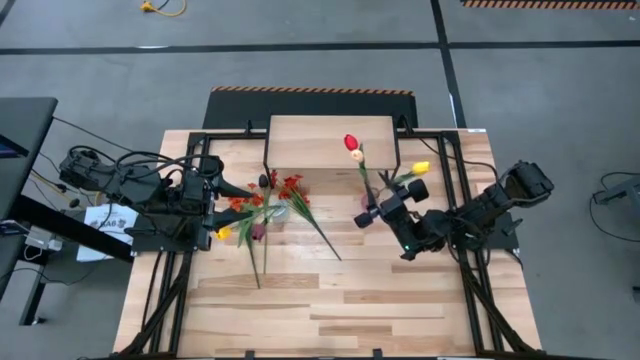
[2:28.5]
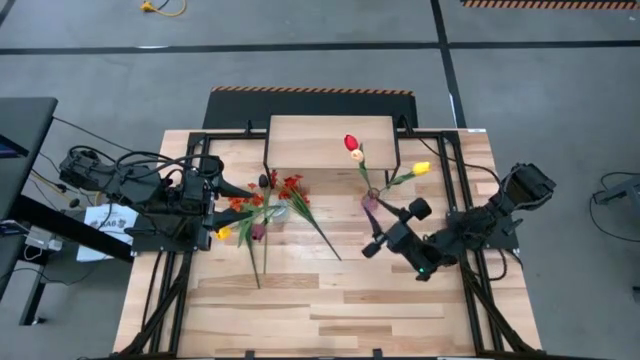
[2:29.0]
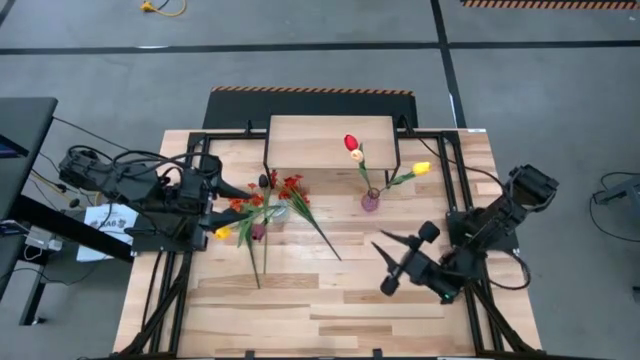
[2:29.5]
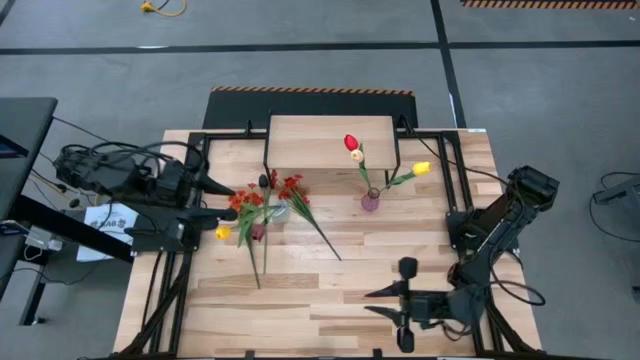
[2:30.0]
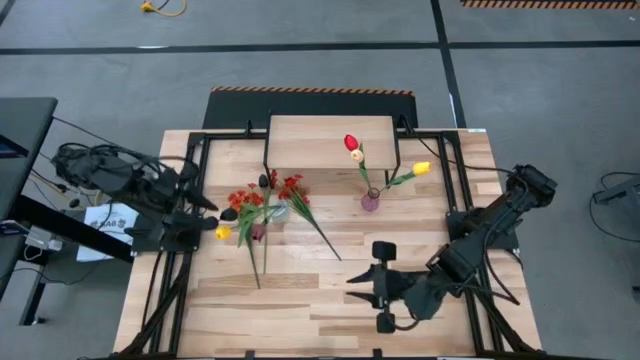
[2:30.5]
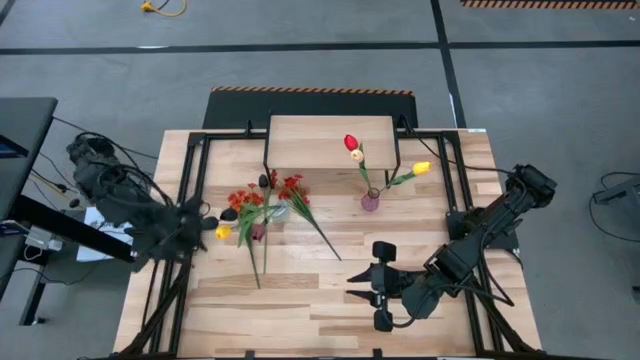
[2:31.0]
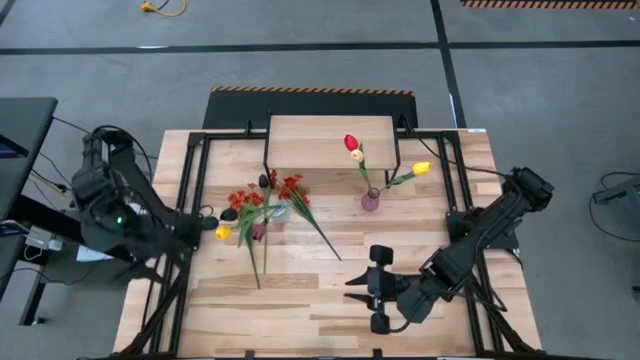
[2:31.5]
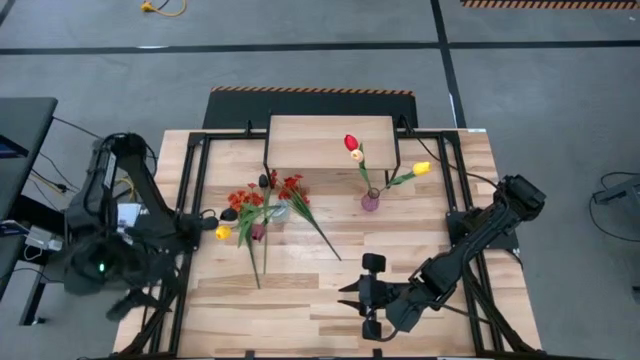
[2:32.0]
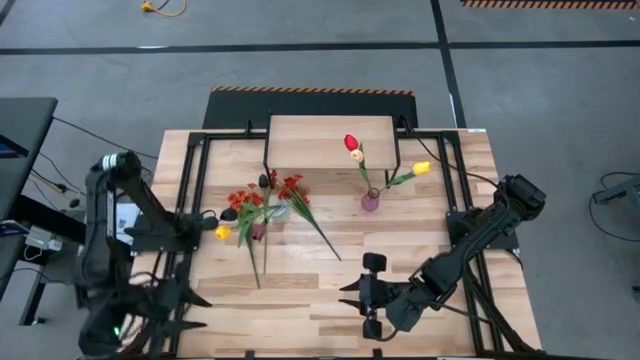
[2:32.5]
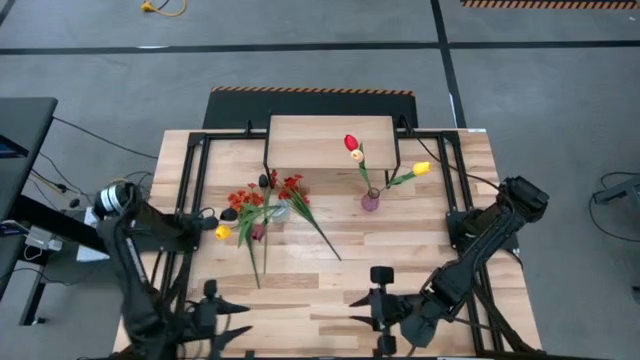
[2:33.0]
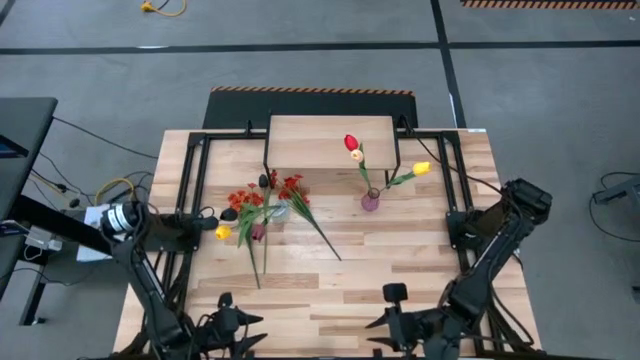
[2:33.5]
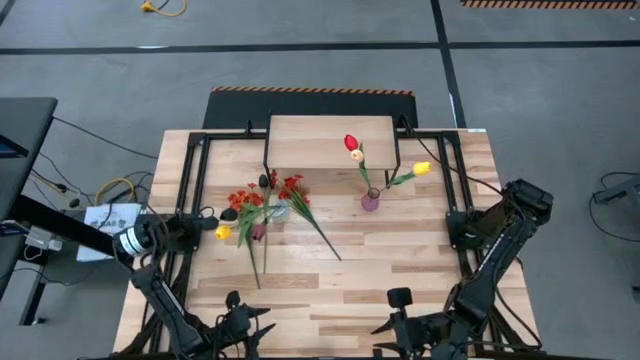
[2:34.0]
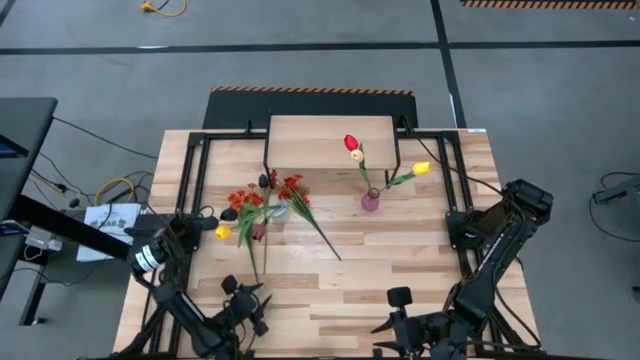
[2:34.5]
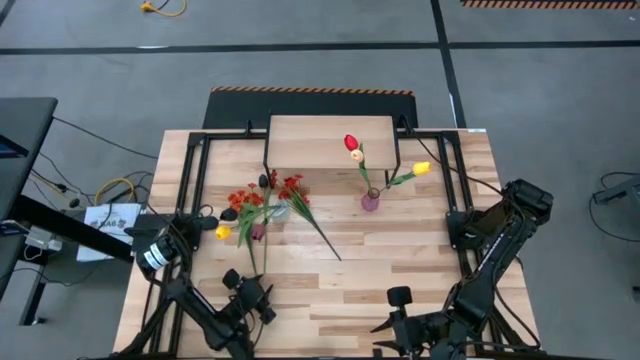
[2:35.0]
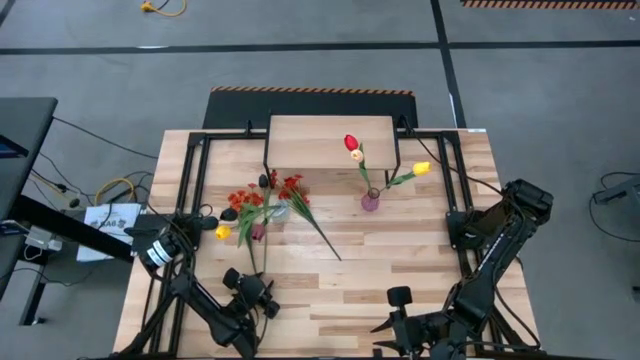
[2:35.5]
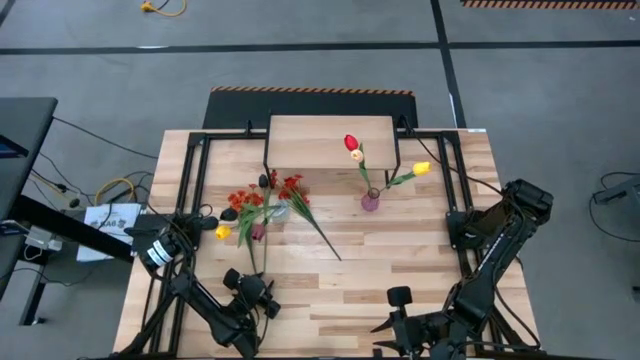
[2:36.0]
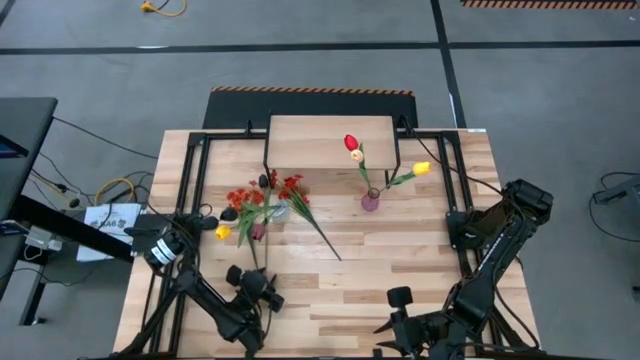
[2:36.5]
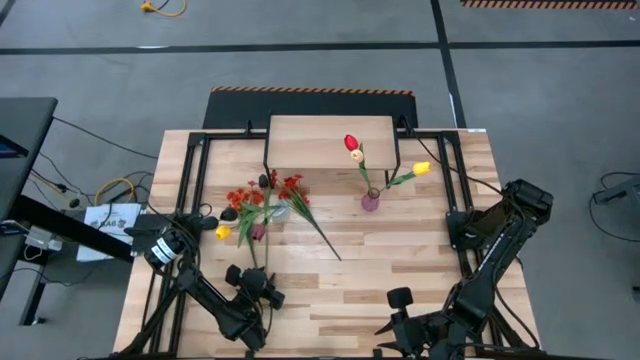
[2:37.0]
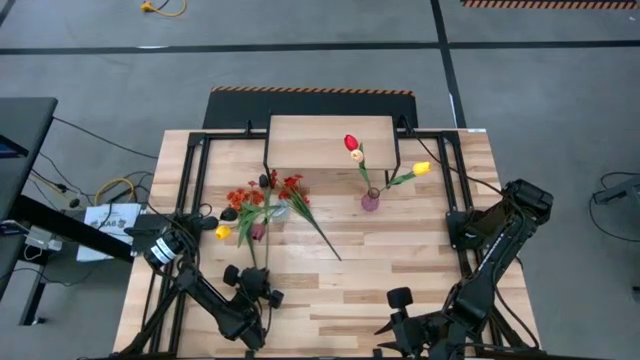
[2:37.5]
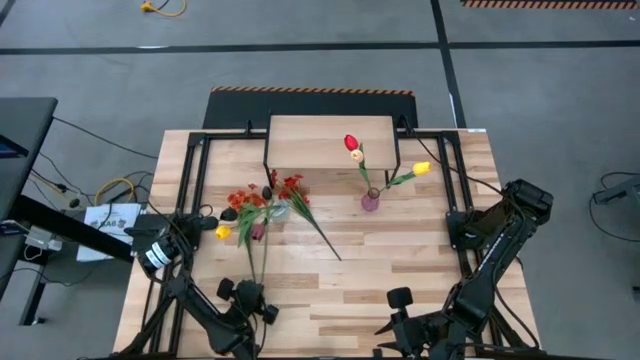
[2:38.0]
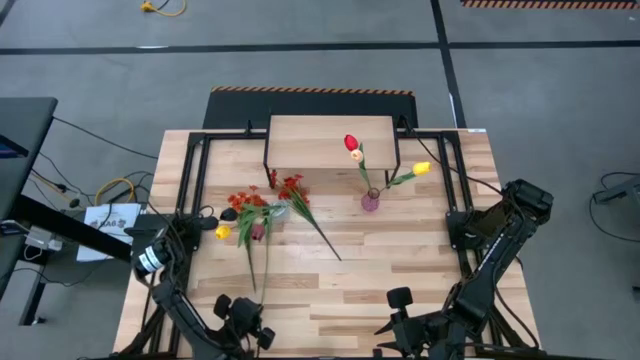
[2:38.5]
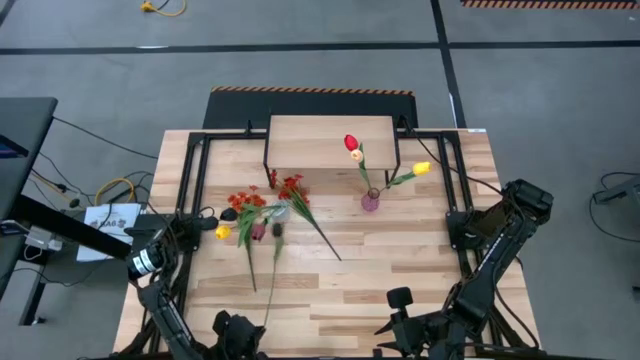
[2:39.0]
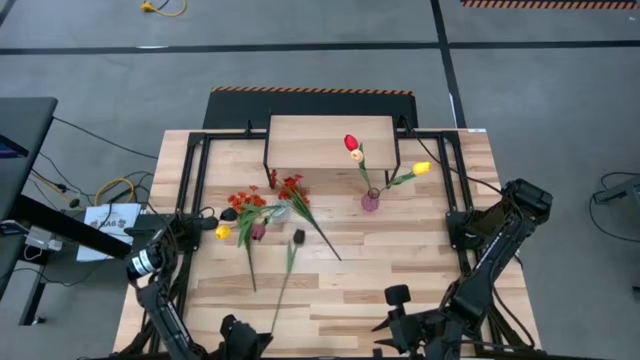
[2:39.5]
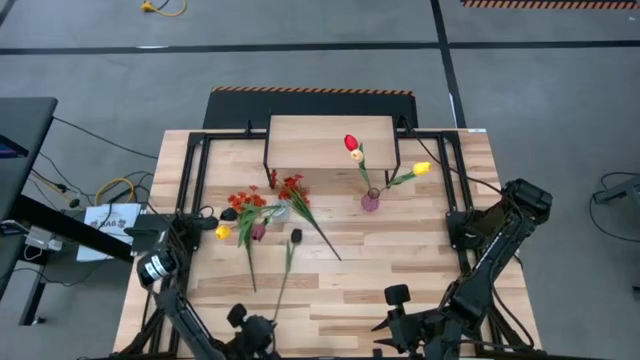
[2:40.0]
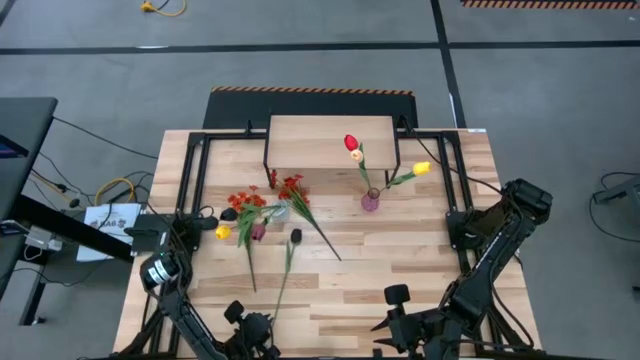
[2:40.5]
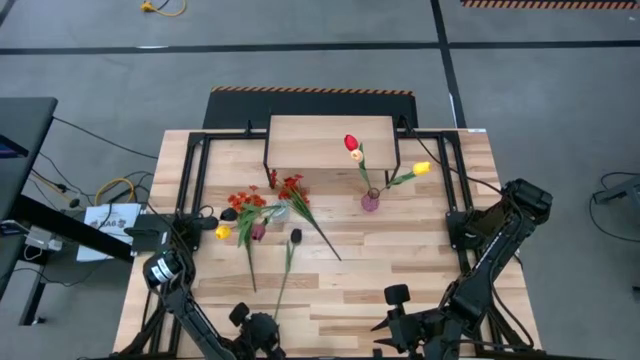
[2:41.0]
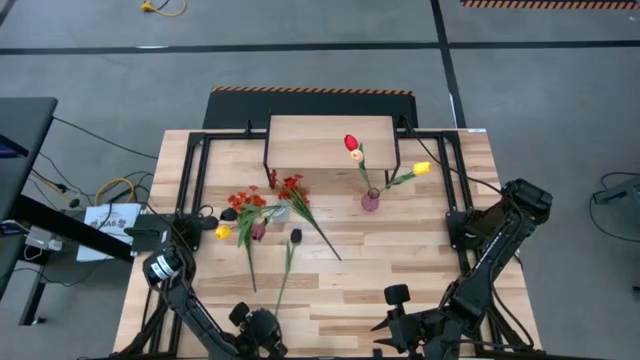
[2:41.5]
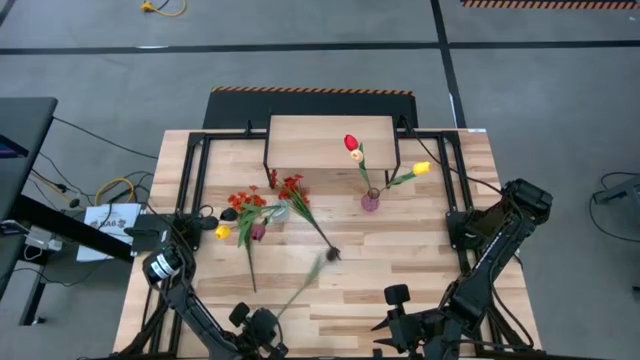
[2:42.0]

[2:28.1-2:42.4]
Task: Pick and place flowers into a vace then onto a shelf
Put the black flower into the purple vase

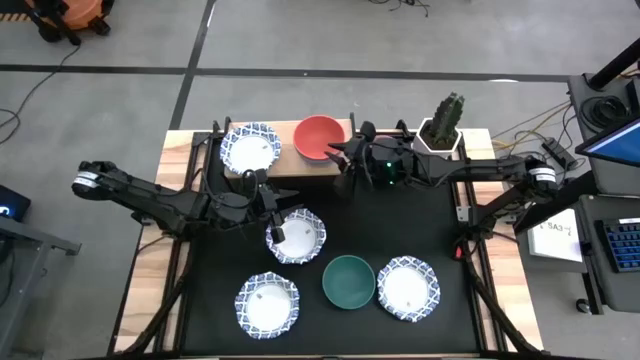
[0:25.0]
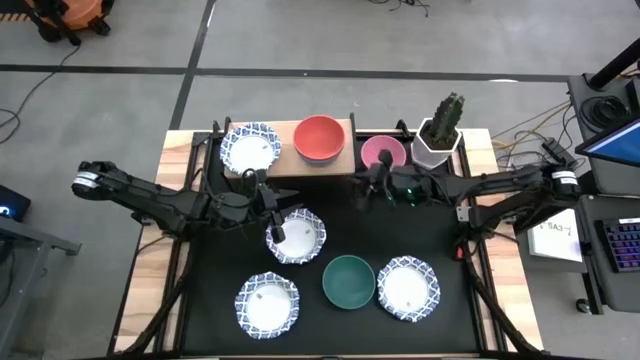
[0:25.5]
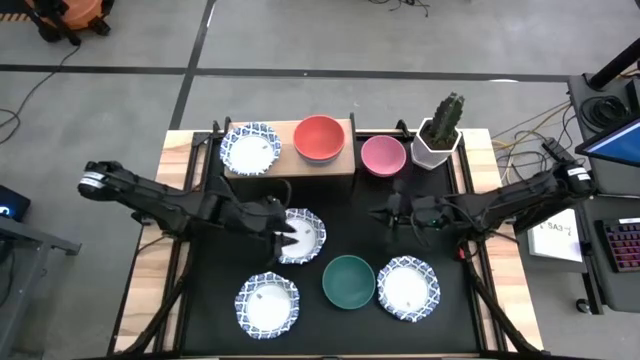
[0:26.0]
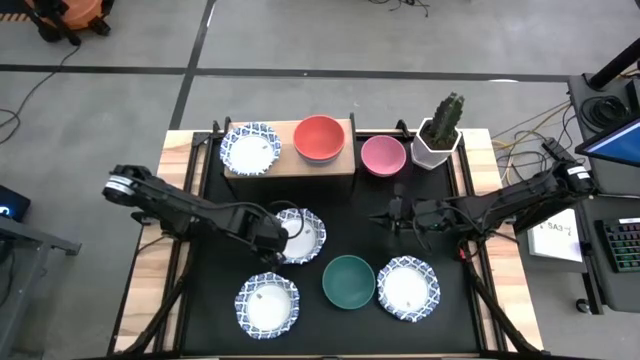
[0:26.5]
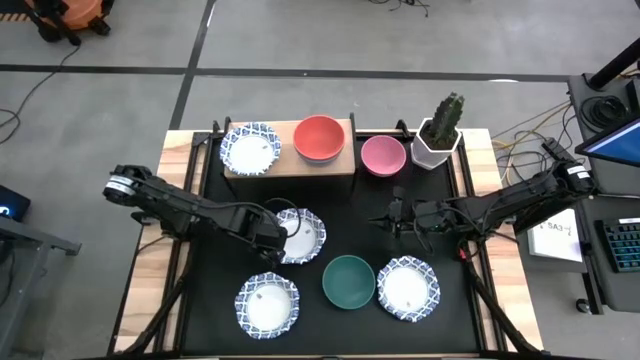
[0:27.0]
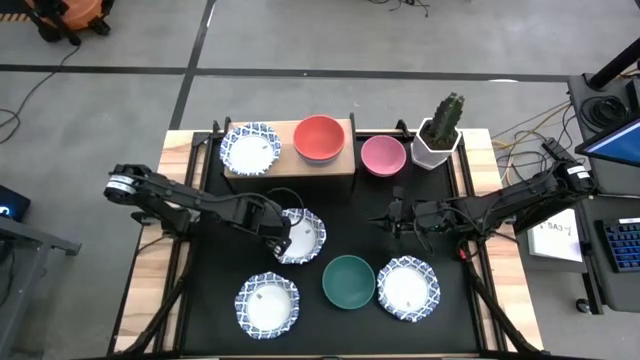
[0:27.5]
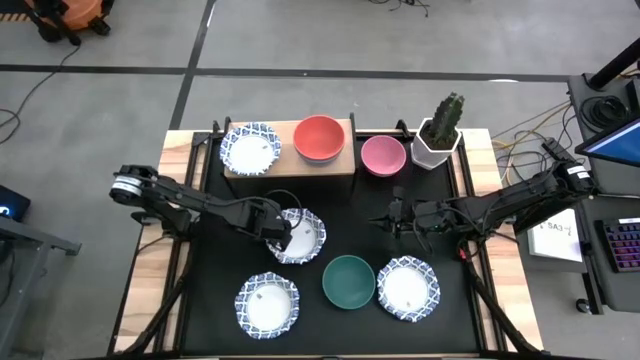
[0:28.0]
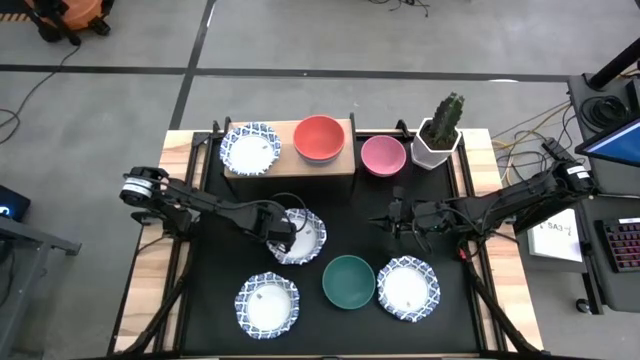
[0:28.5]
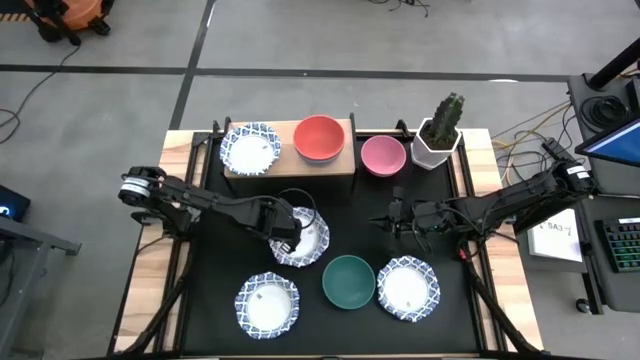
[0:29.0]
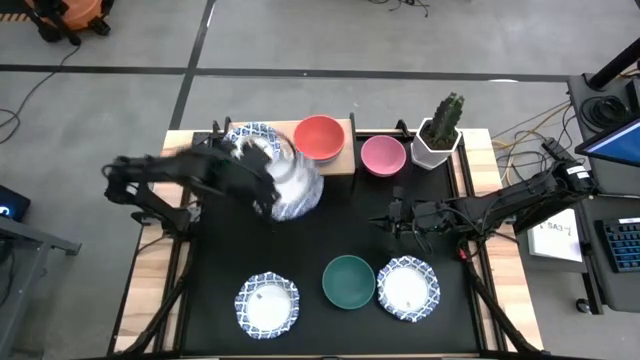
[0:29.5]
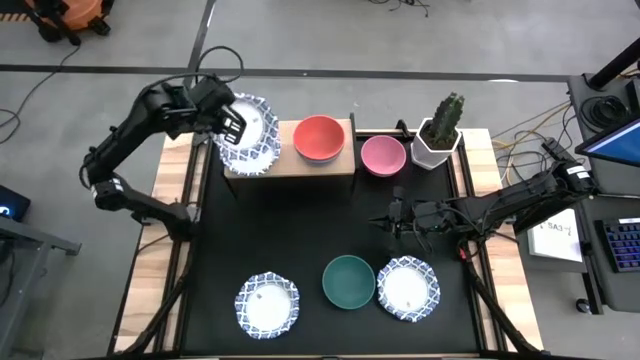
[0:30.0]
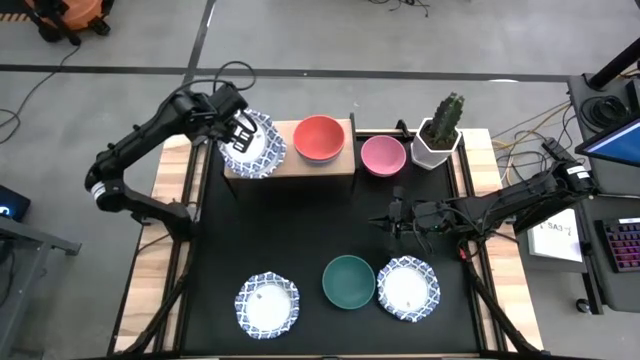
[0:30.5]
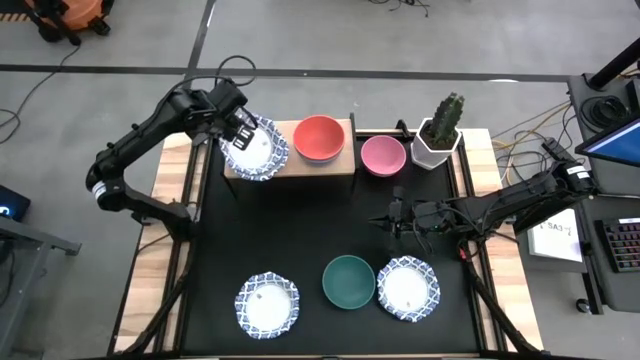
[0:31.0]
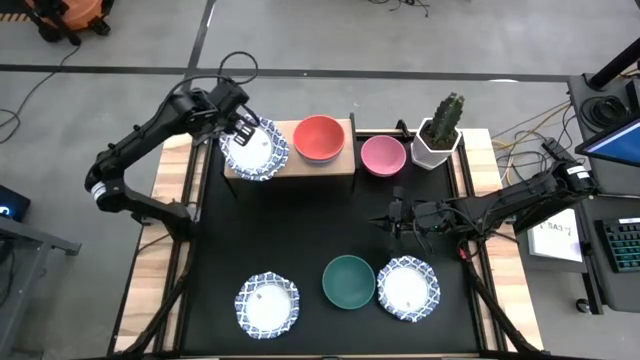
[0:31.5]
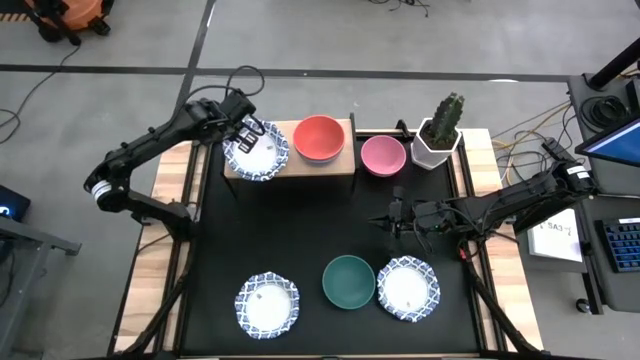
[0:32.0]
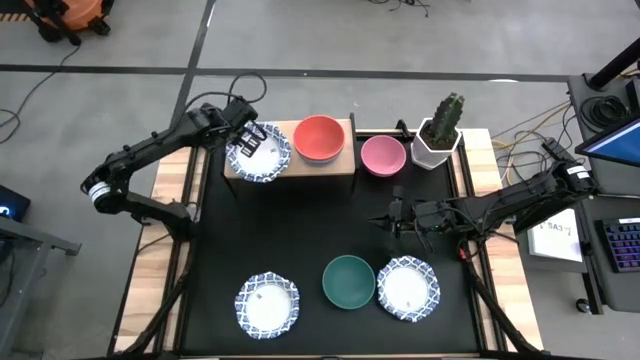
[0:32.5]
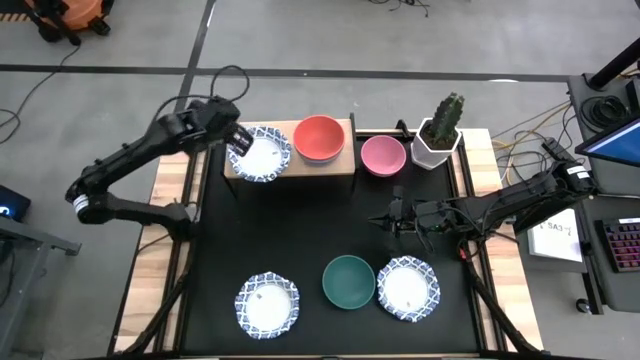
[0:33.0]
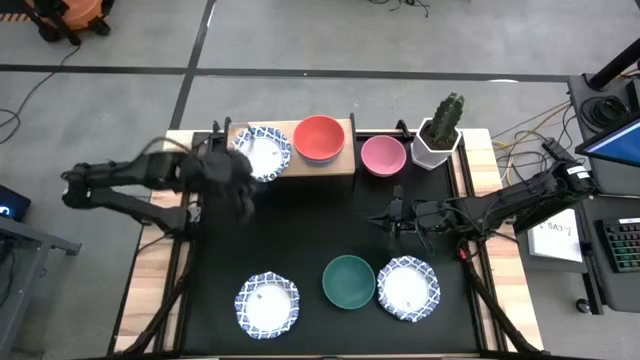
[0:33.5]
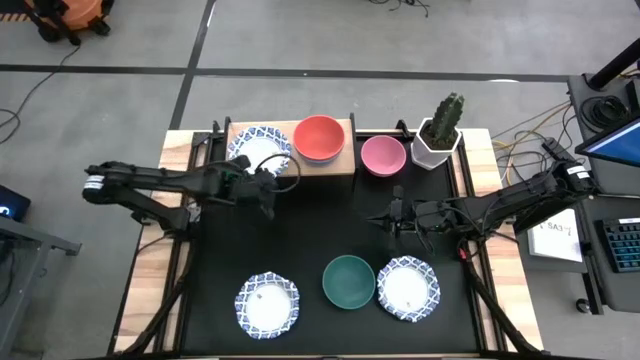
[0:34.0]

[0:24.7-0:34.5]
Task: Place and stack bowls onto a shelf
Stack the white patterned bowl on top of the white patterned bowl on the shelf
